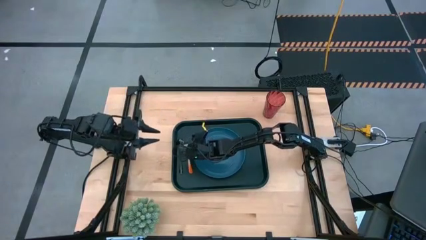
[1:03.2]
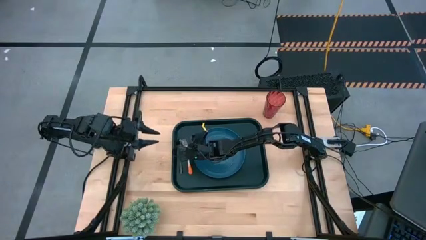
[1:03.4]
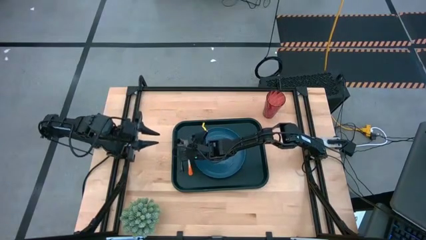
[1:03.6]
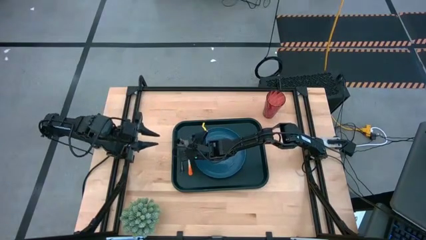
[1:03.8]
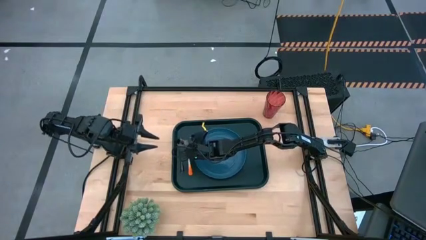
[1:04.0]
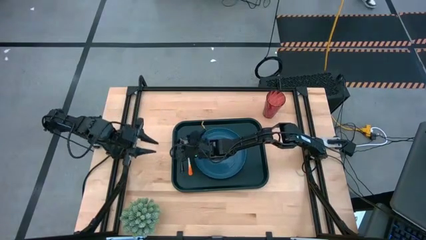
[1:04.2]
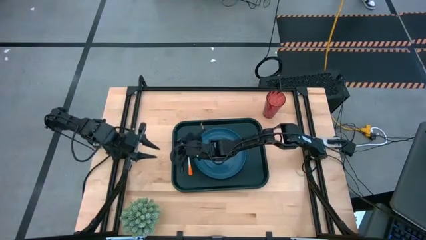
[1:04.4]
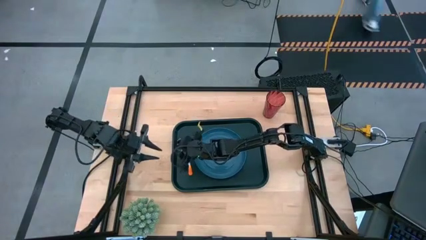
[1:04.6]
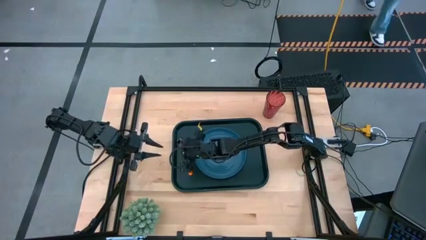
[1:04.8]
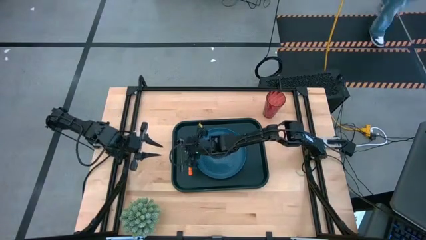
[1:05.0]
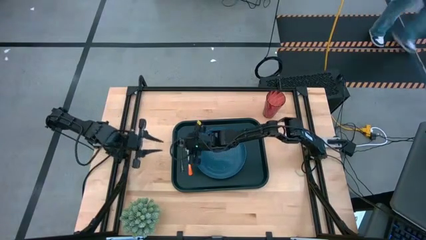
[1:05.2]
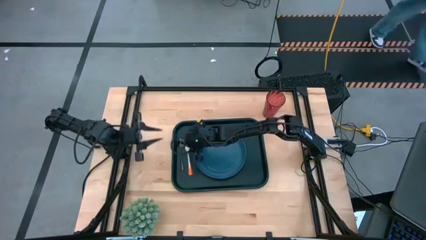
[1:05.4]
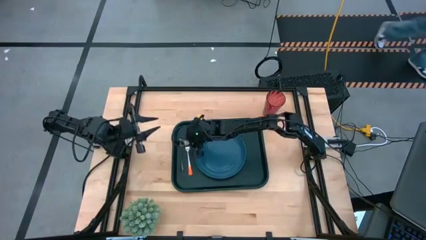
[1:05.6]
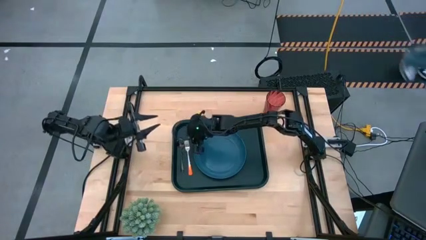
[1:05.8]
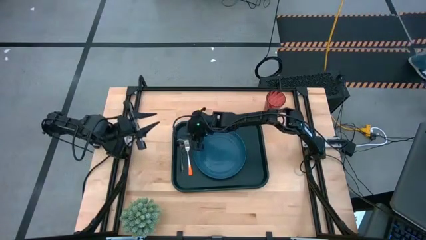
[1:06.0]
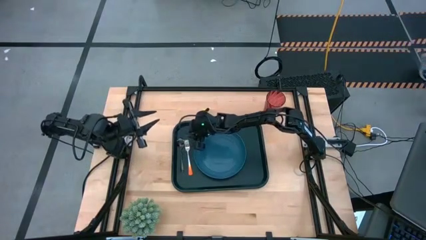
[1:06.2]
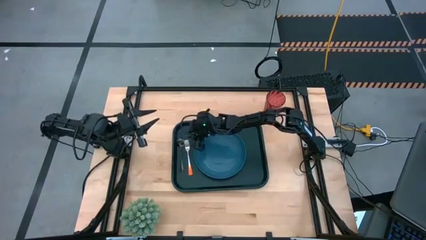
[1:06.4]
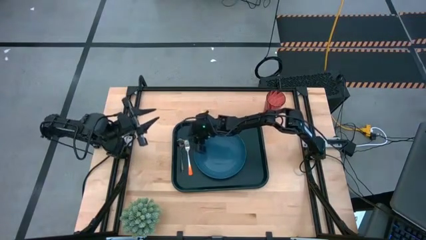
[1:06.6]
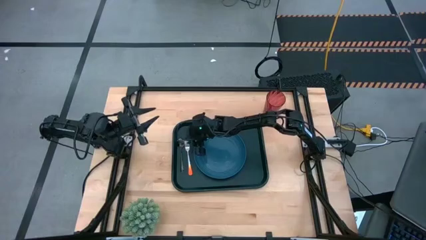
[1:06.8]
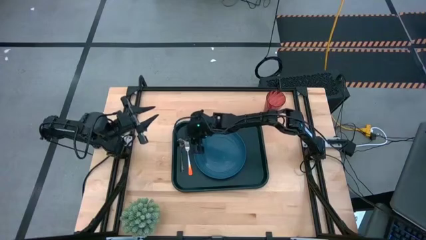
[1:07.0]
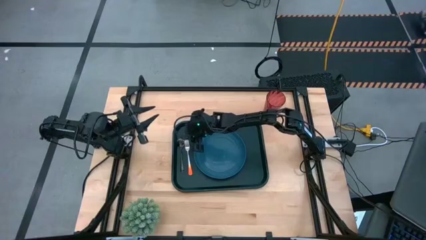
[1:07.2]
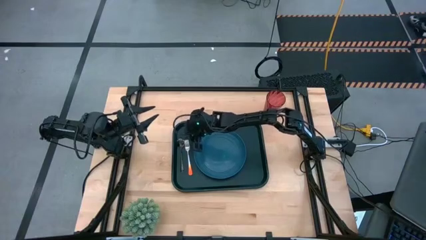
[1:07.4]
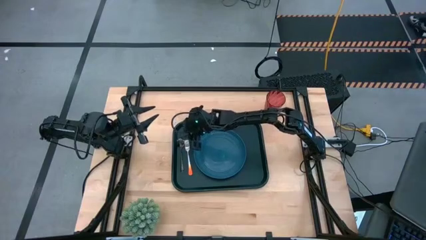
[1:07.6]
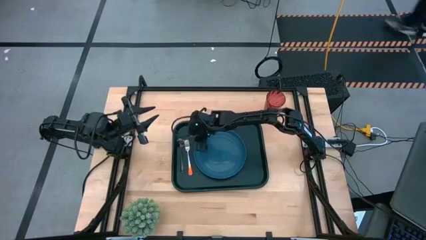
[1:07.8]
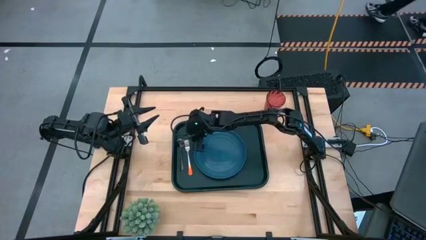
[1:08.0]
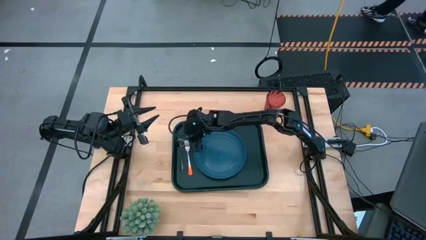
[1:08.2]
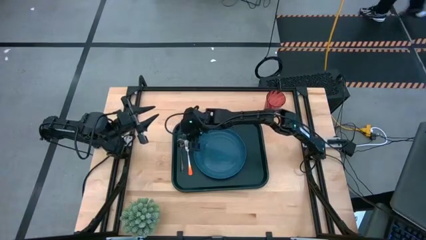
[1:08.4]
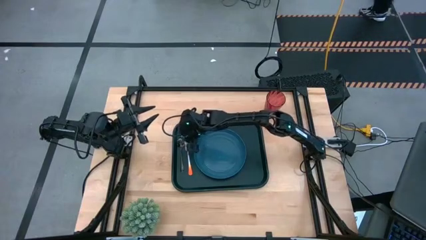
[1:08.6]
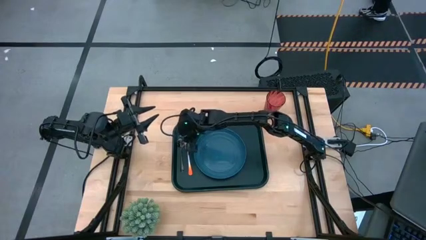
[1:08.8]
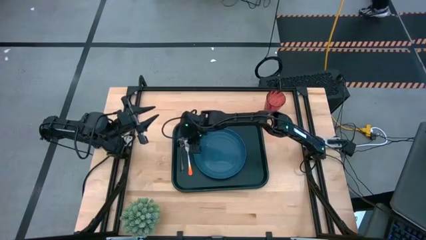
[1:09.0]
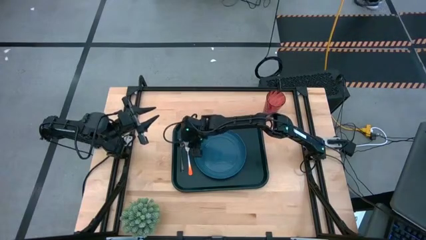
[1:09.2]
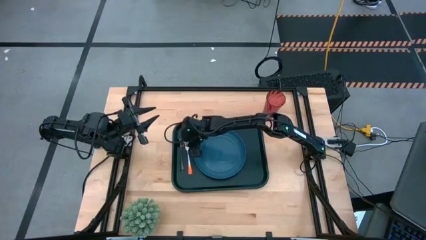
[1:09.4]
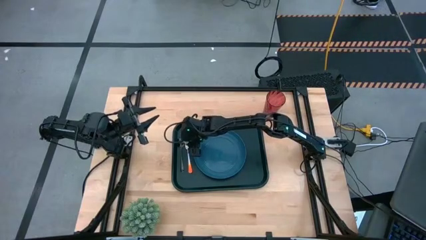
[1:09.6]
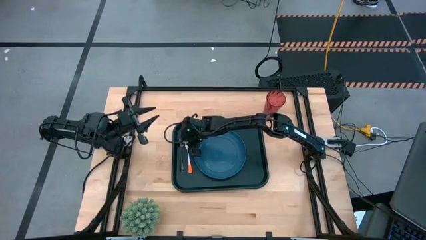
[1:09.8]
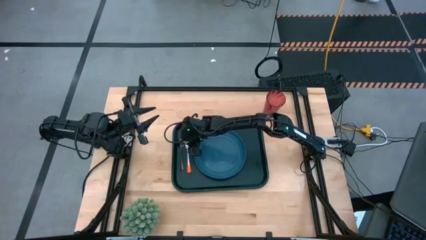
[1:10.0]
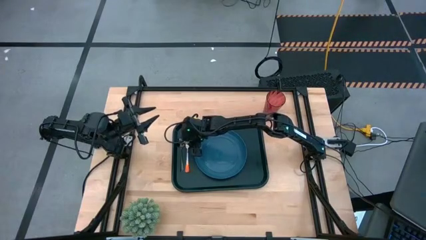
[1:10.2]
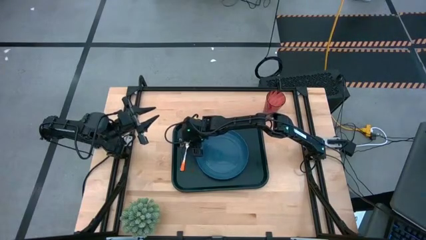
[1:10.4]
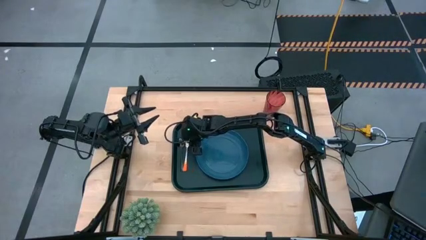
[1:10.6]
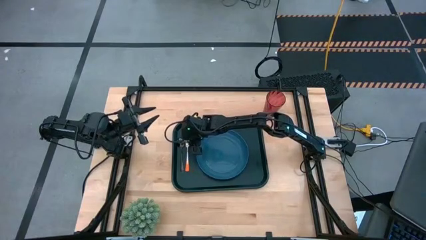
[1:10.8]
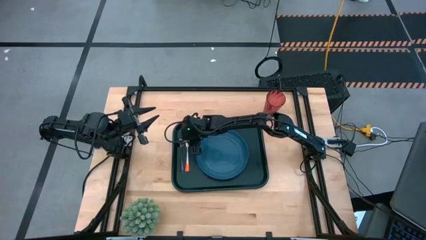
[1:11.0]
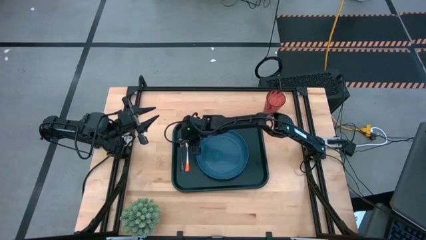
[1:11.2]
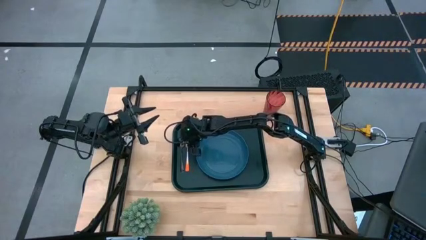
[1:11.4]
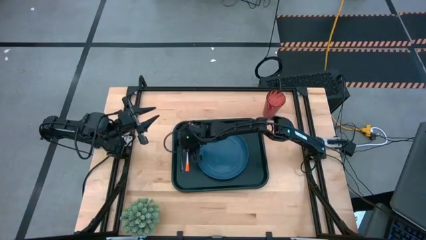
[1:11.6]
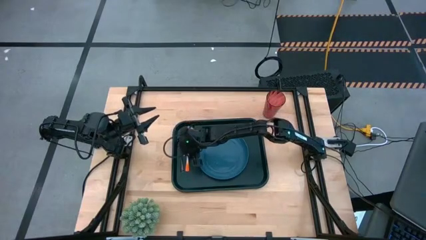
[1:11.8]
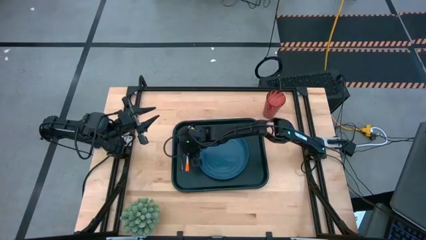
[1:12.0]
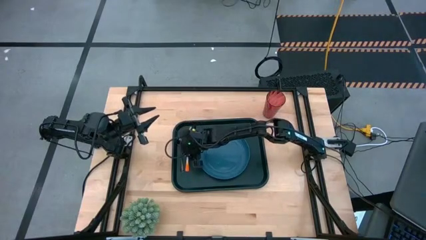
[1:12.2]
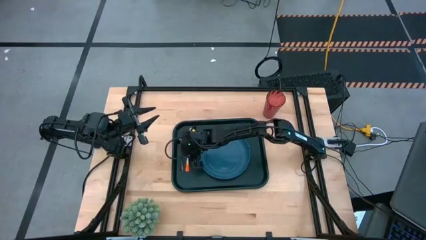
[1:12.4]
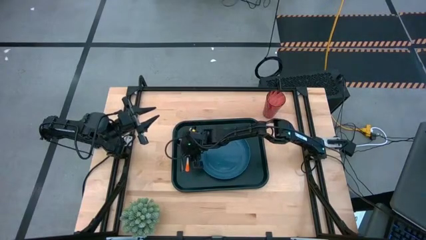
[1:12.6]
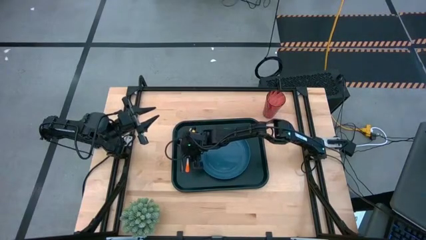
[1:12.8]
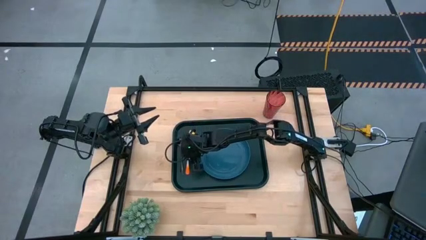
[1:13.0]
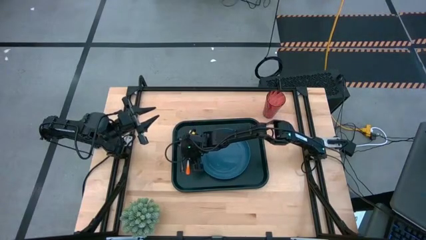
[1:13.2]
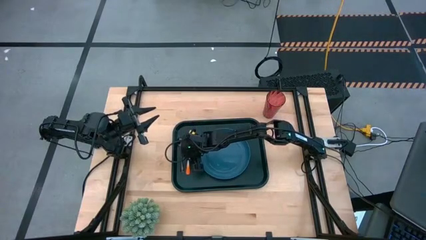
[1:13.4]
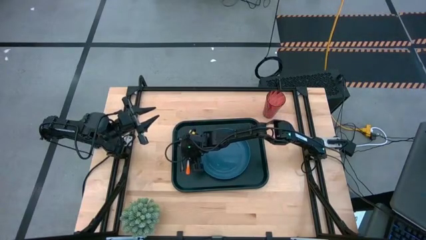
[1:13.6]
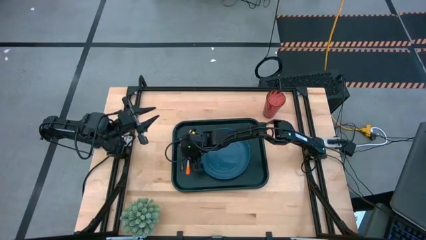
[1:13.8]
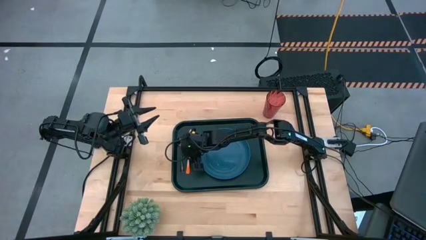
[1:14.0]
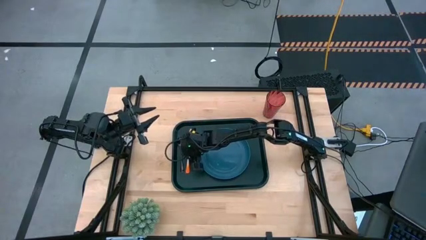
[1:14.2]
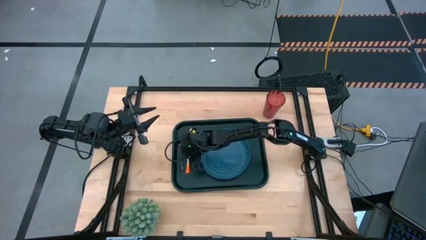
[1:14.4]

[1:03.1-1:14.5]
Task: Pick and place plate/cup/fork/spoon on tray
Put the orange fork between the black spoon and blue plate on the black tray

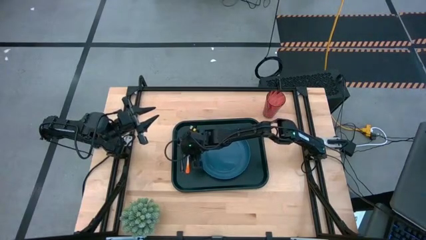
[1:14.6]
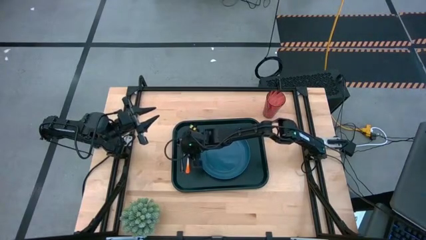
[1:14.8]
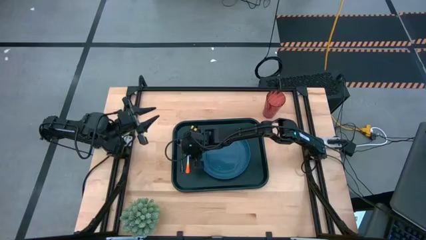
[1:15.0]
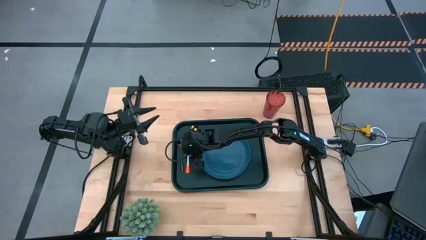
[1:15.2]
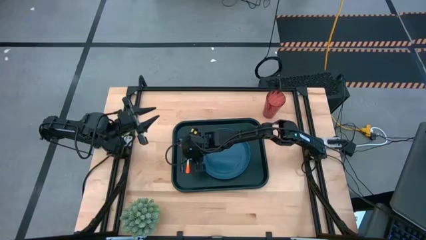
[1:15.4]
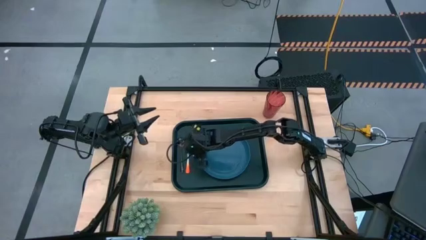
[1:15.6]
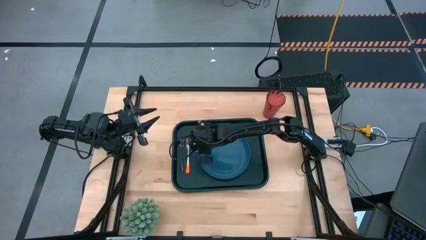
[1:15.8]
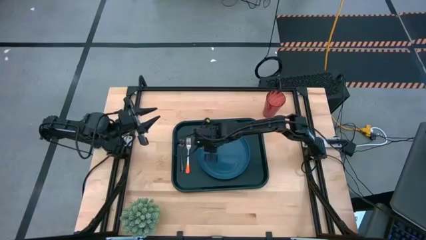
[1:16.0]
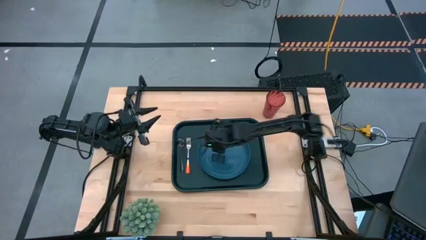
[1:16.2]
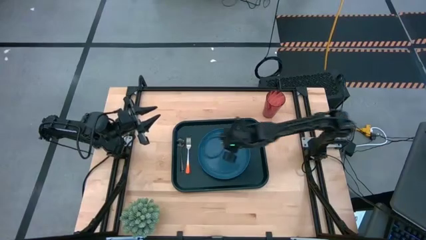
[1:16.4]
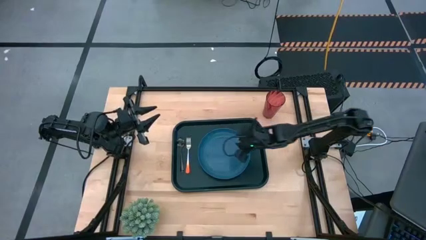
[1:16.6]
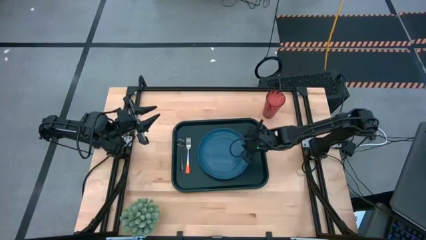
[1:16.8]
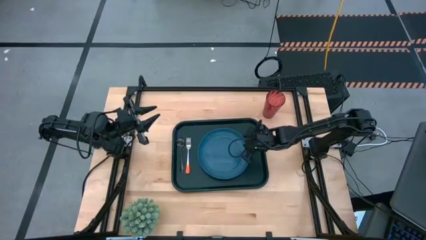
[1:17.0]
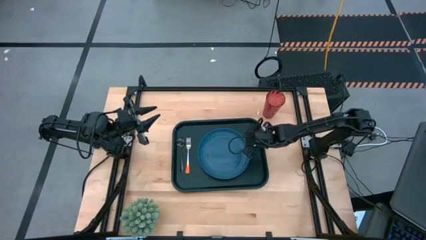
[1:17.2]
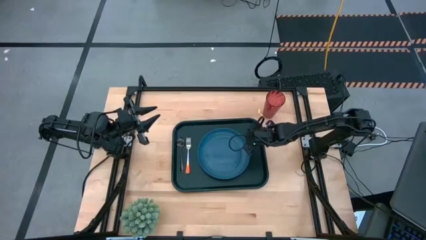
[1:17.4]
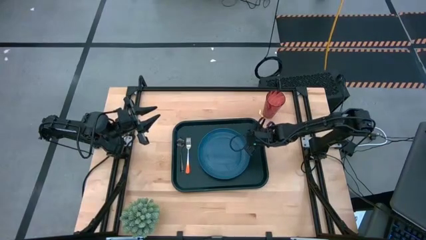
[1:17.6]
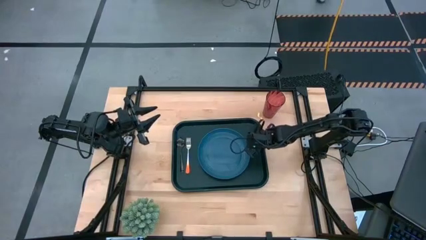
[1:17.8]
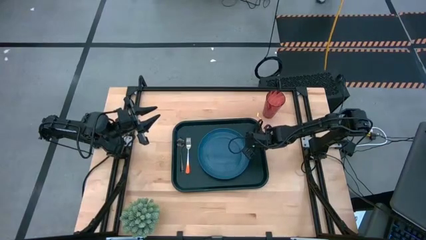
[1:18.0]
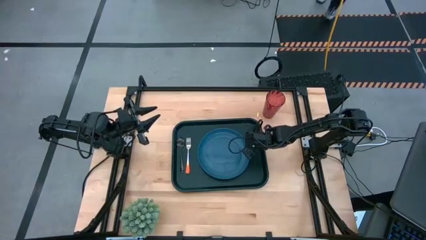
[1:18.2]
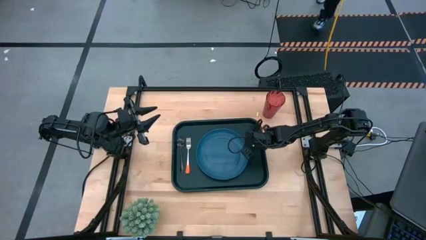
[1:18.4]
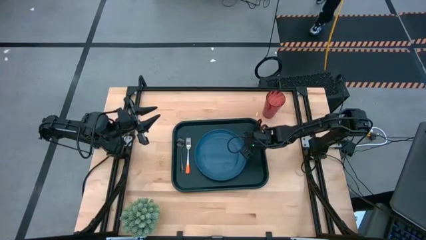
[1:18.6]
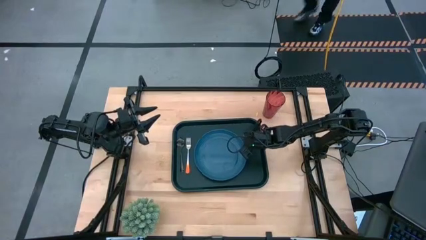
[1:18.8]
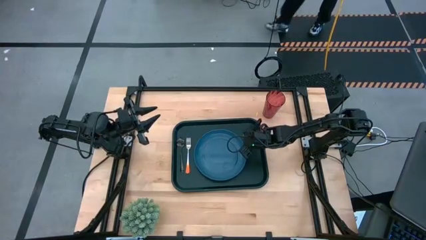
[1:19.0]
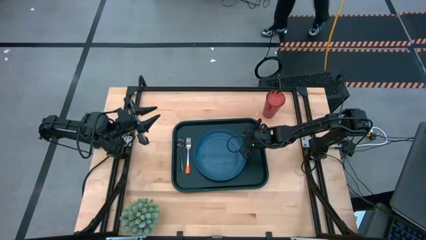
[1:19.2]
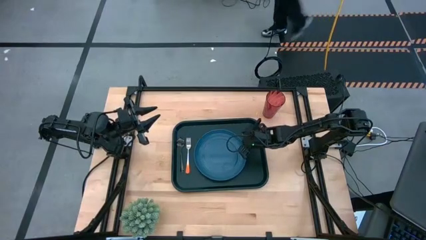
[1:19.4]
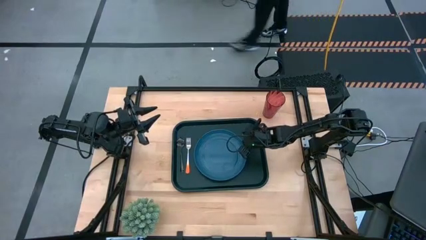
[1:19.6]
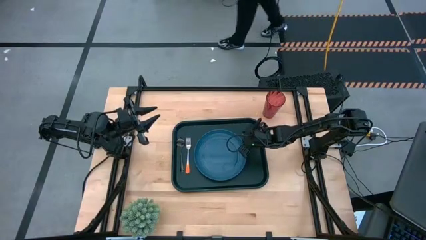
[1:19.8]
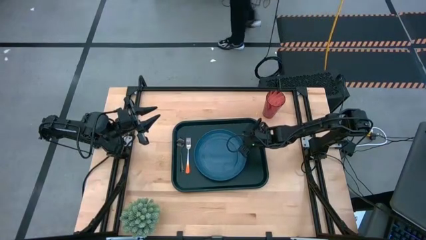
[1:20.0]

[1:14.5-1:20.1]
Adjust the blue plate on the black serving tray

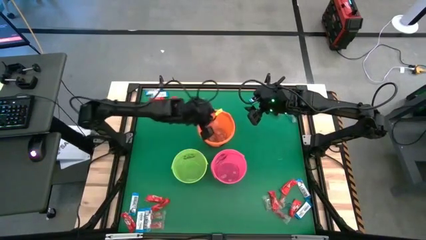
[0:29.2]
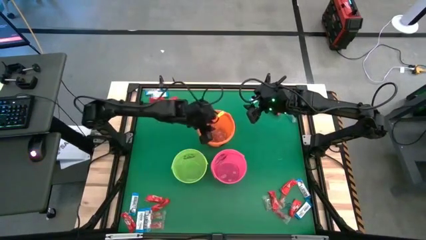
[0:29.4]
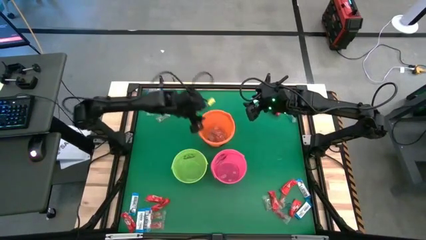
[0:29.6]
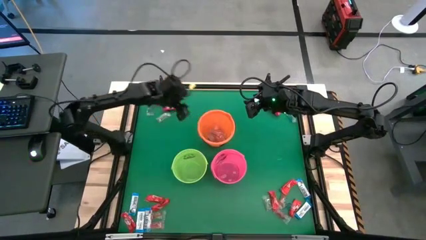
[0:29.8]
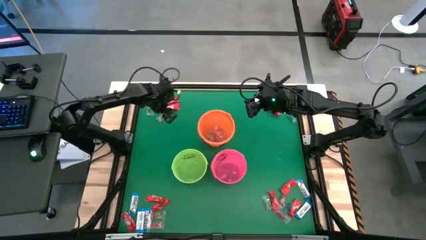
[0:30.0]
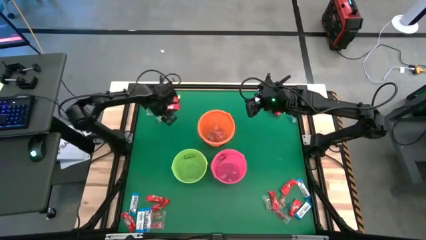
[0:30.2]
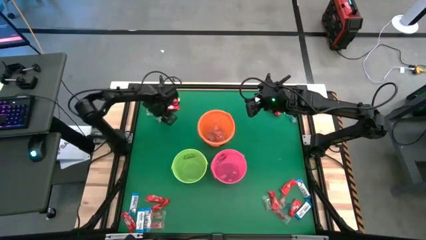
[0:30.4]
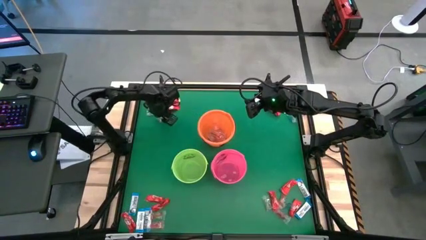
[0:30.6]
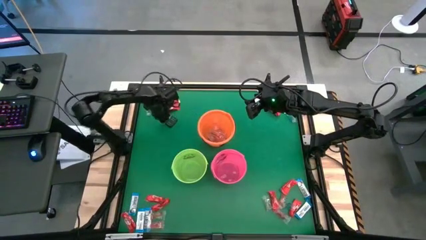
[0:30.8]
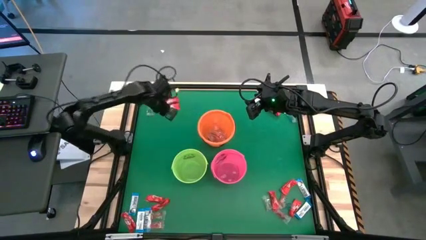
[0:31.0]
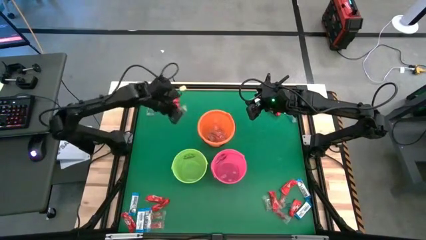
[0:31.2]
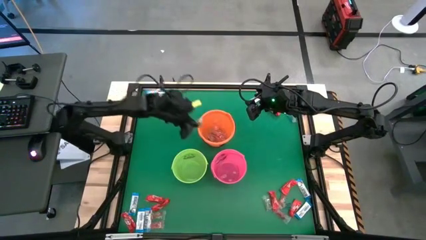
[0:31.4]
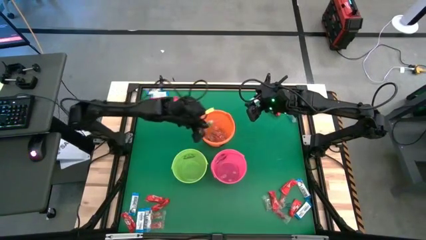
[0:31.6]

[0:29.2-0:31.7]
Task: Sort candy by brand, put in halloween buckets
Put the green gummy into the orange bucket
